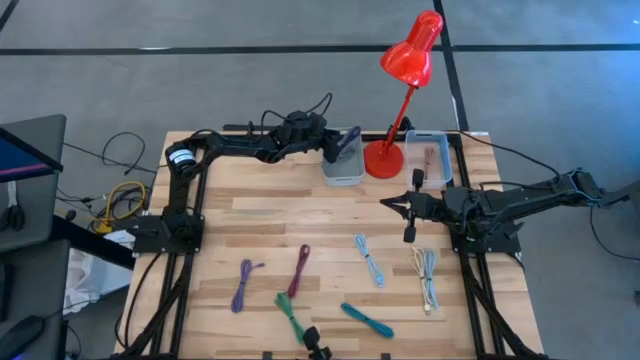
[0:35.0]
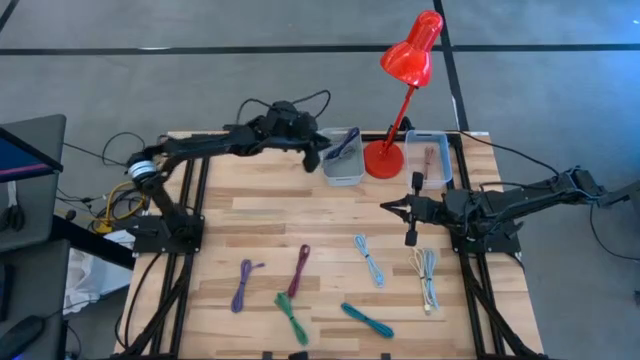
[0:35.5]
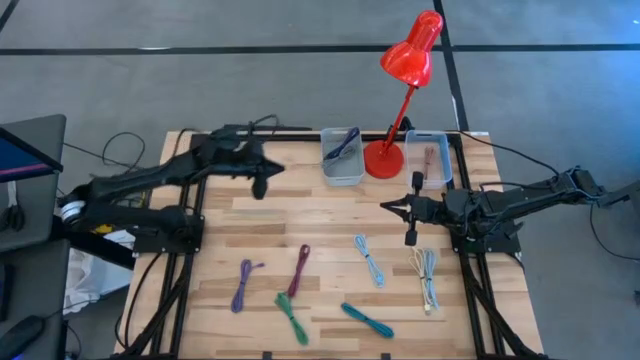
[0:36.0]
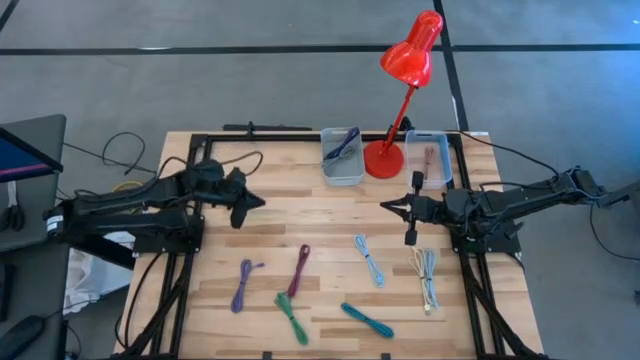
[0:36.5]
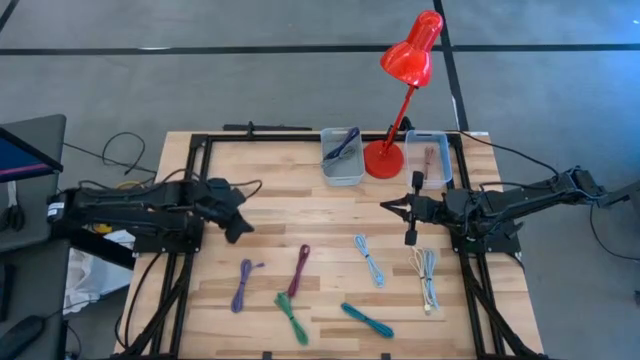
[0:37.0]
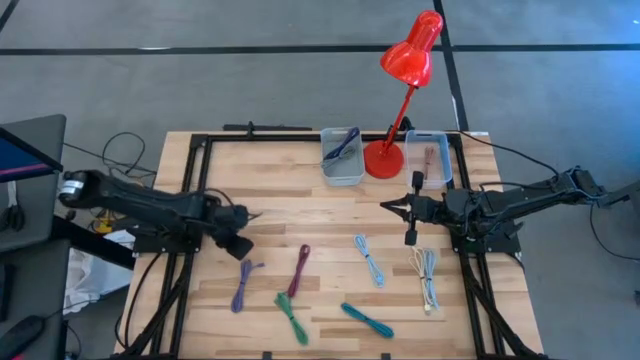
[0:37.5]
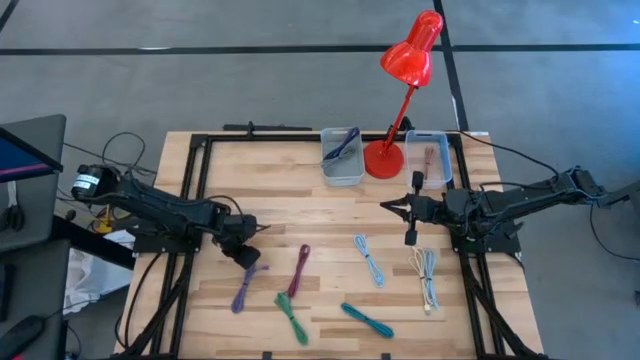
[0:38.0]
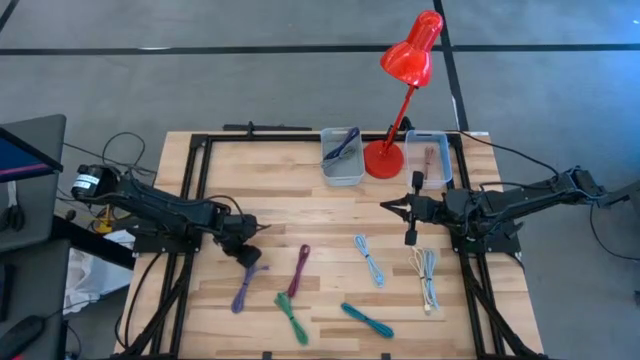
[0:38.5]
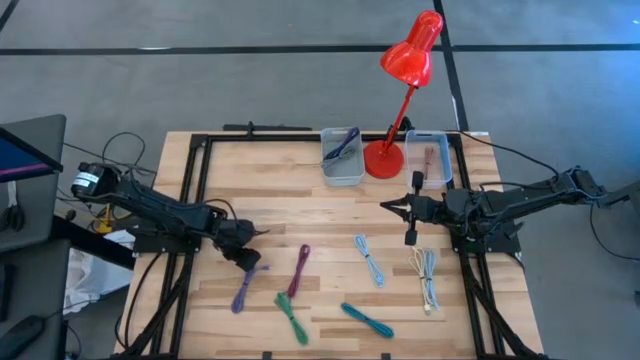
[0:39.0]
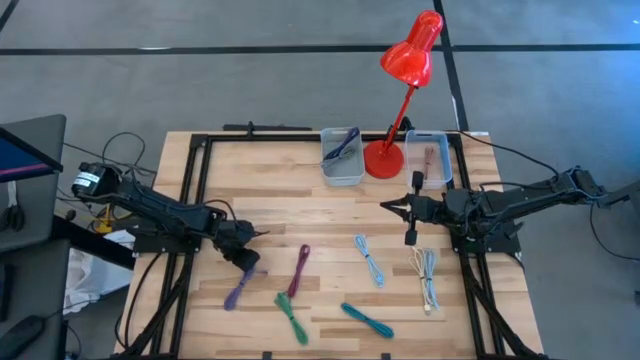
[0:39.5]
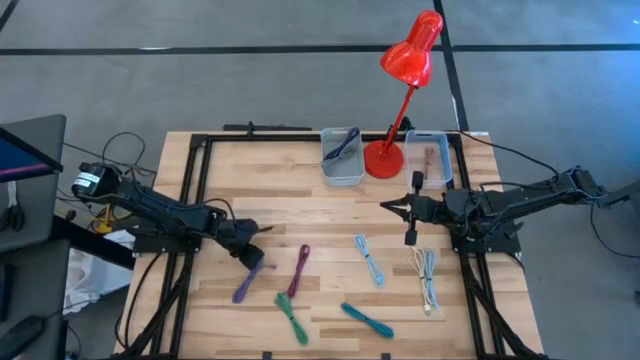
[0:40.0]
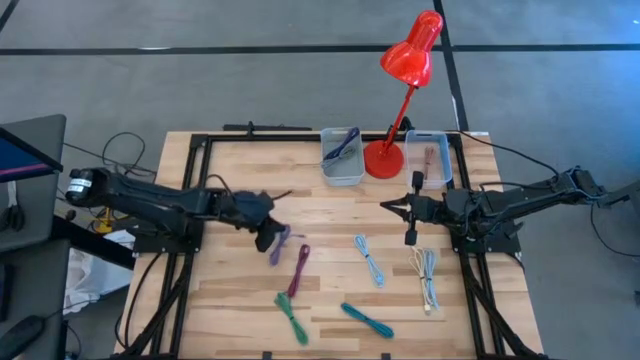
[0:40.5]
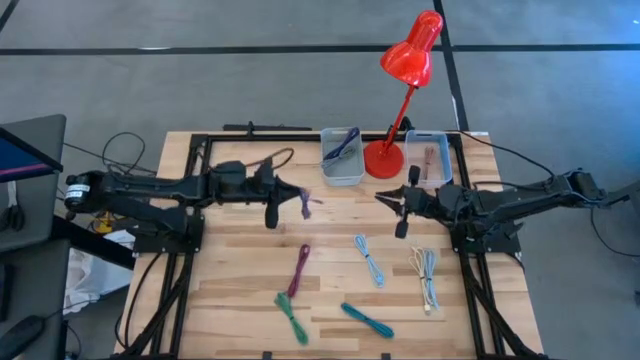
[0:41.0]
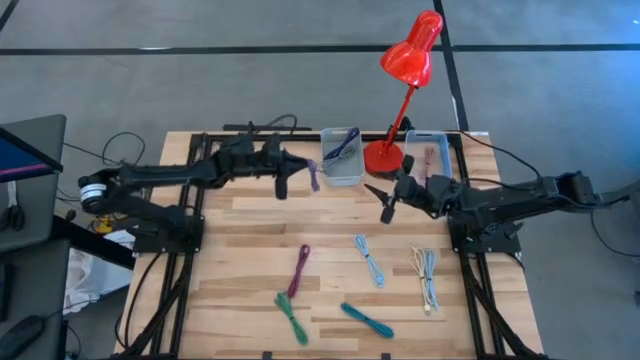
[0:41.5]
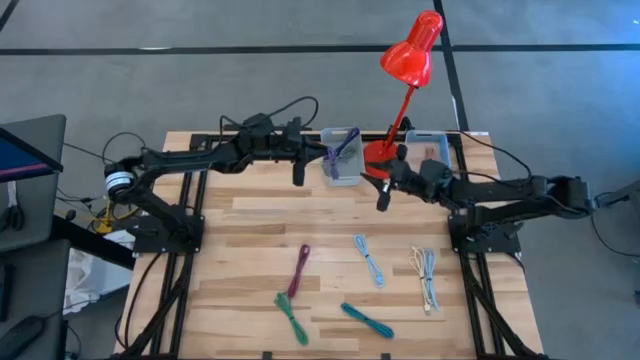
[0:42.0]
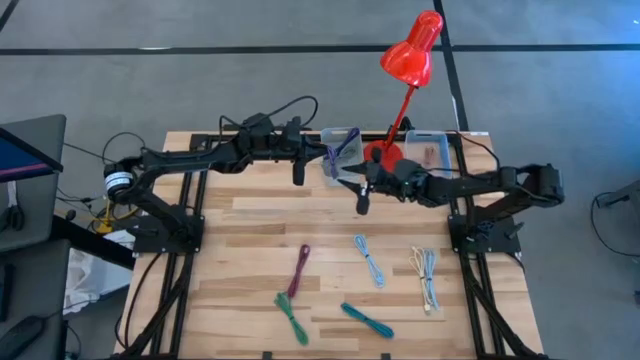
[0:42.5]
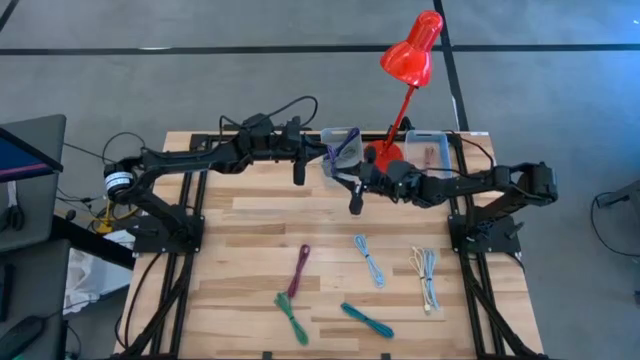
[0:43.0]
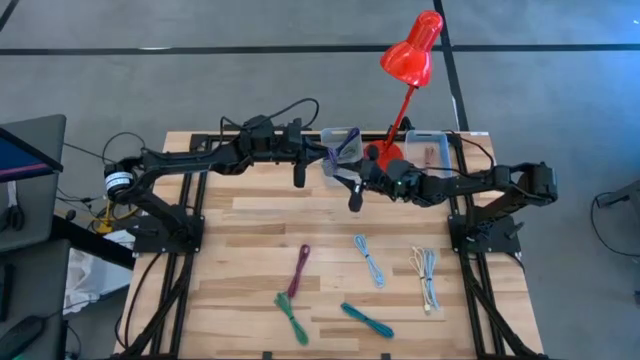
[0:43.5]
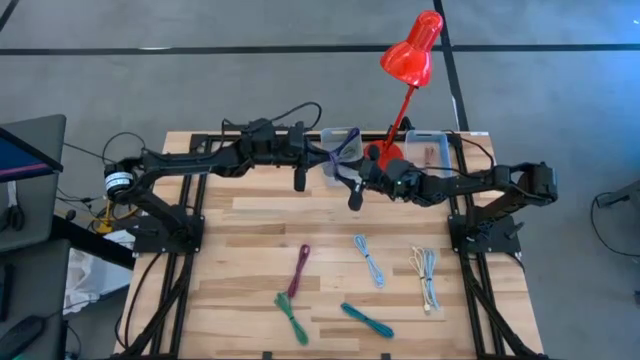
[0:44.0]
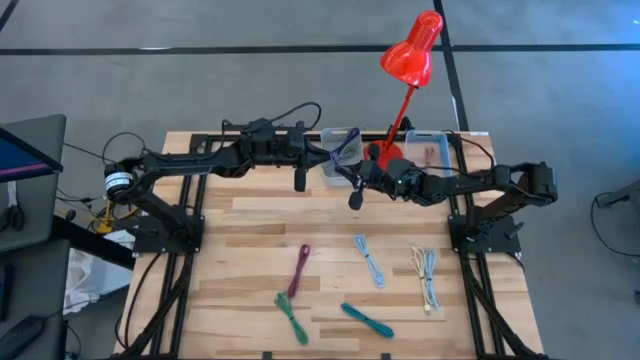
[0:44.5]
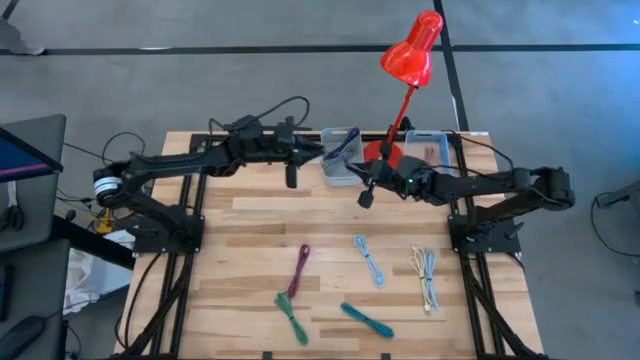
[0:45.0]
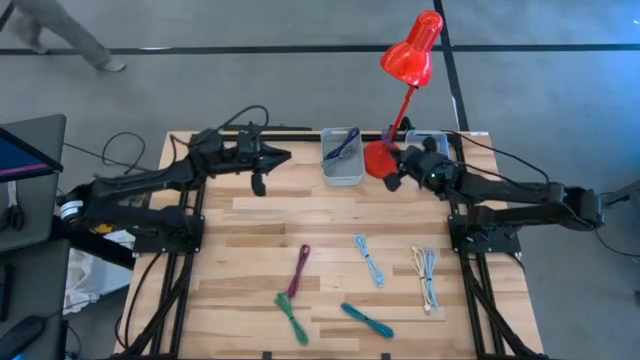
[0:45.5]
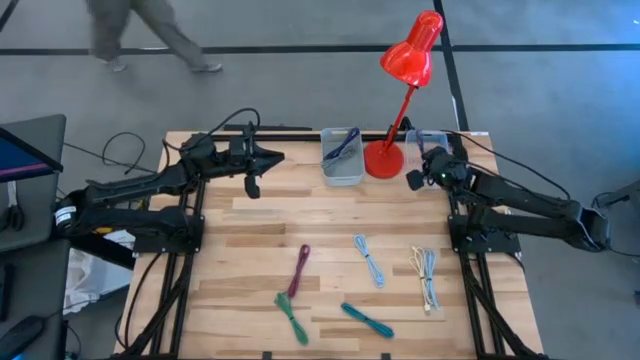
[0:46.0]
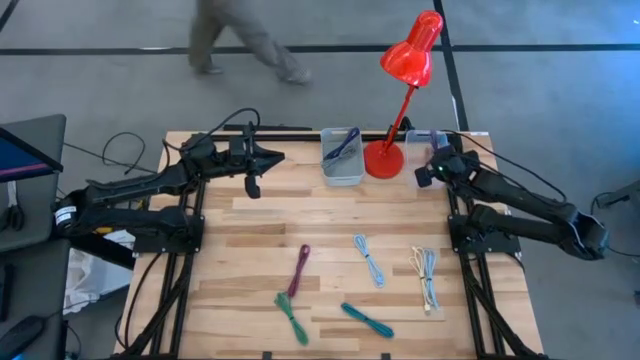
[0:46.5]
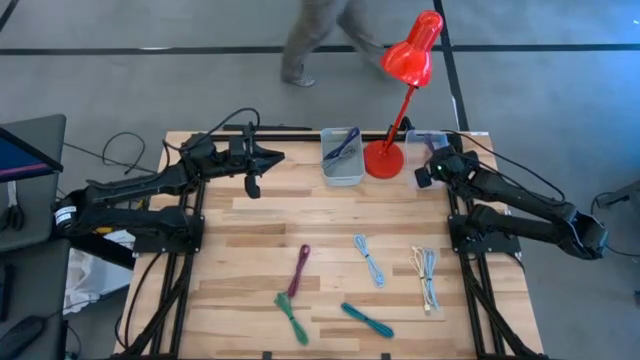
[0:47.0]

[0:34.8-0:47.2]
Task: Pick & Place USB Port
Put the purple charger cable into the transparent bin

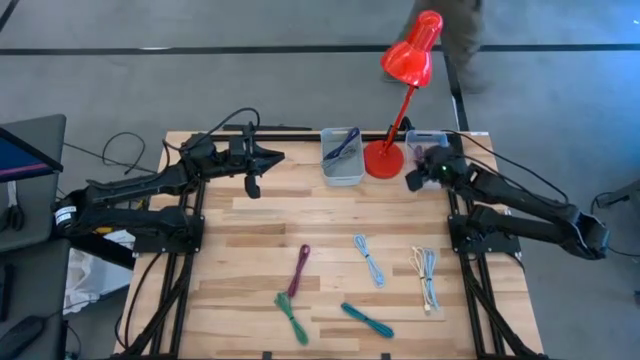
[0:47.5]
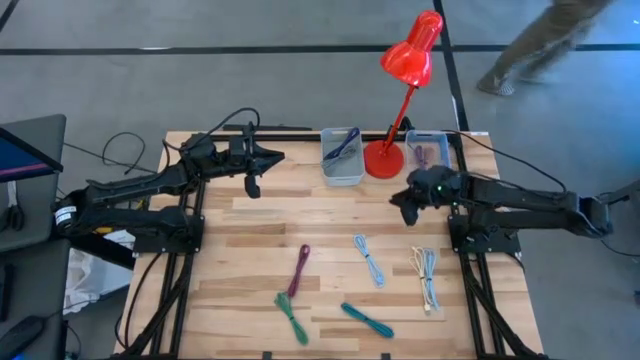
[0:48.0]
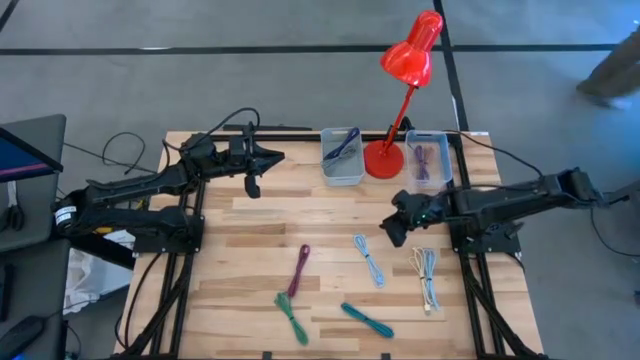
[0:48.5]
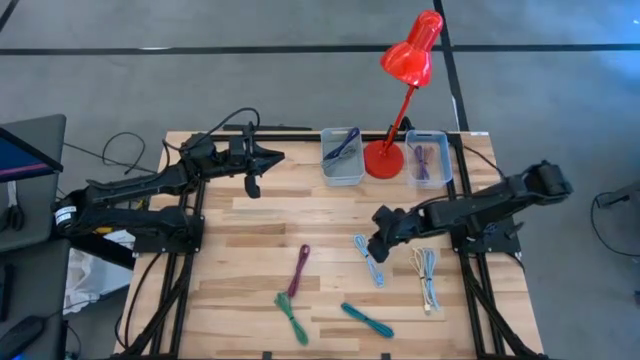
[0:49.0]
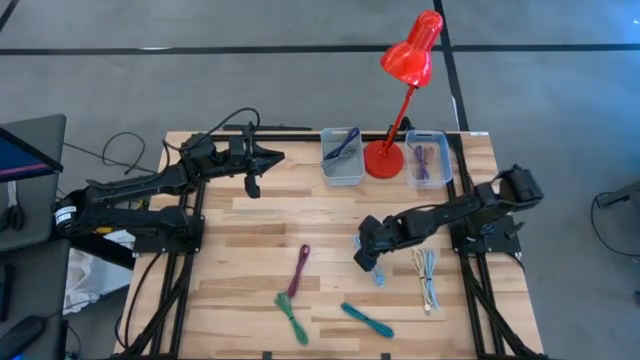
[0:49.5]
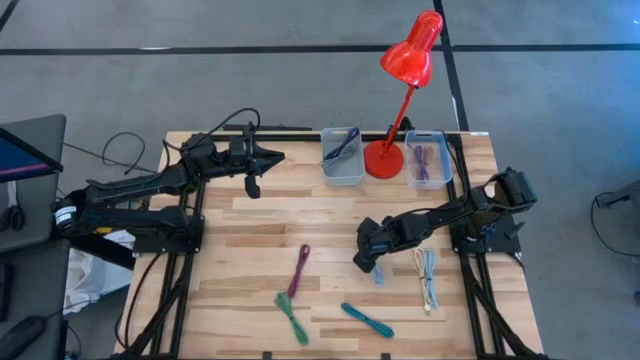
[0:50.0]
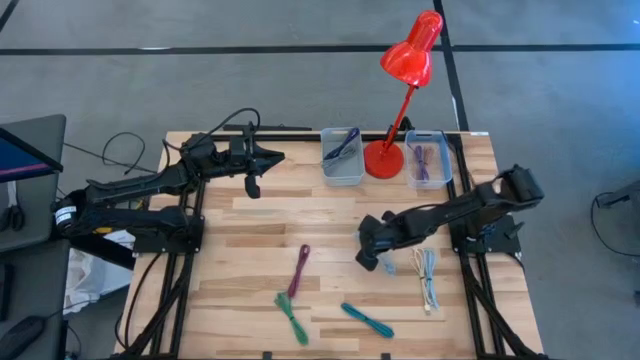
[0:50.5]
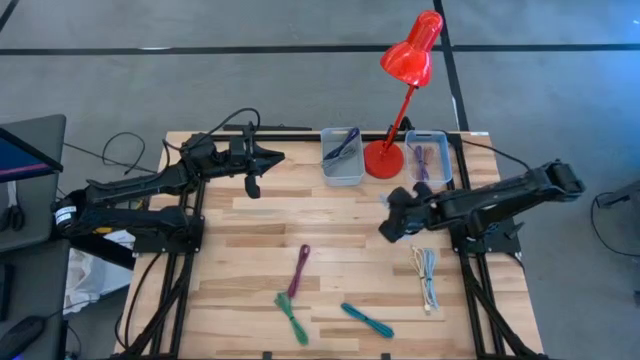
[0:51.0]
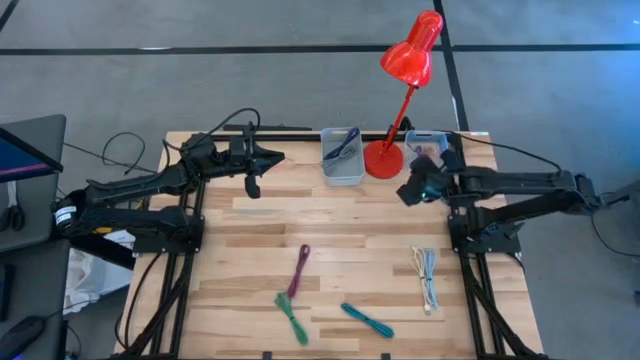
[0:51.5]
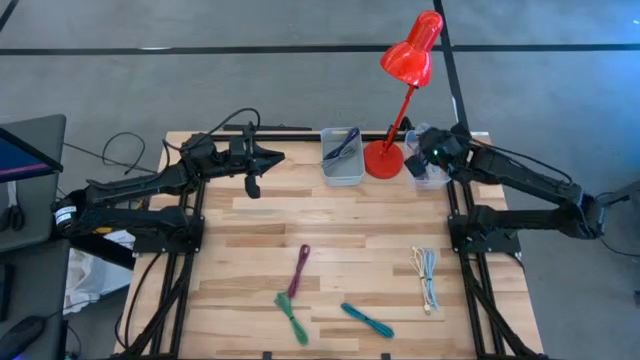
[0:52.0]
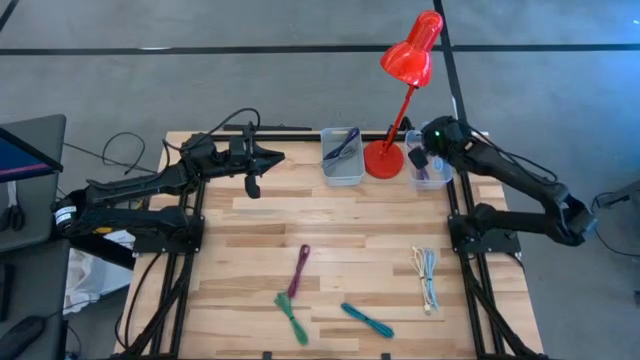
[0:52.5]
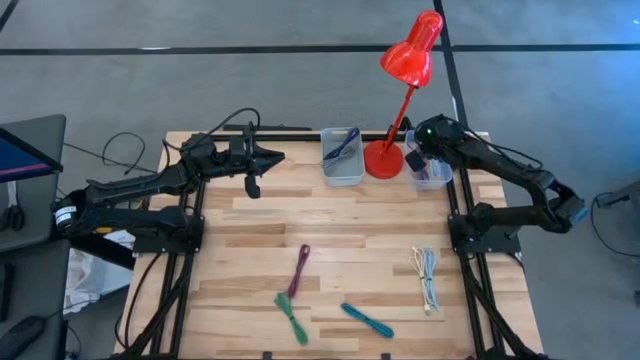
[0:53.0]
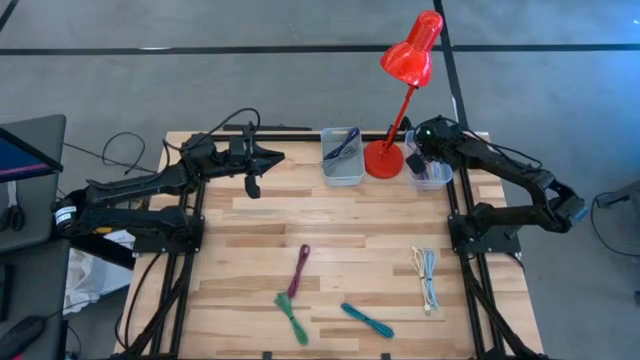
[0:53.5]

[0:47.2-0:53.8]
Put the left light blue charger cable into the transparent bin

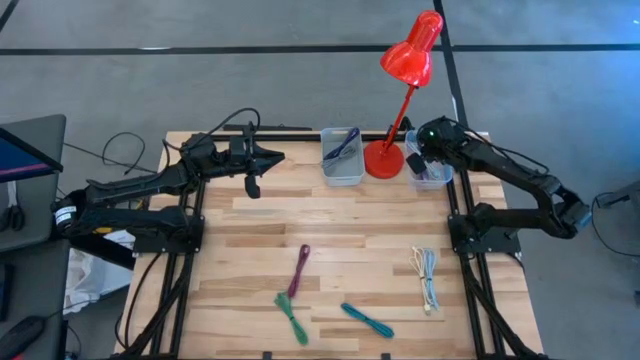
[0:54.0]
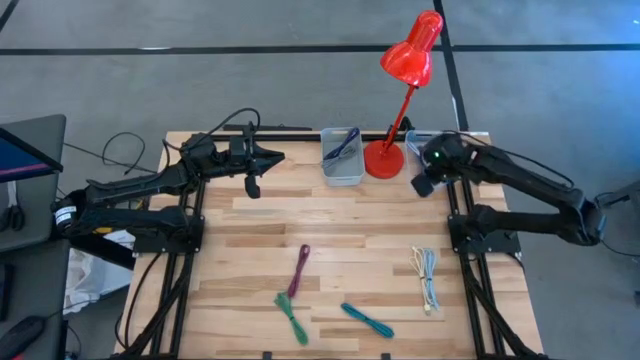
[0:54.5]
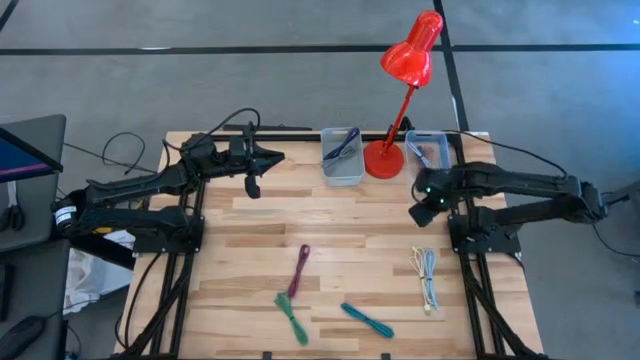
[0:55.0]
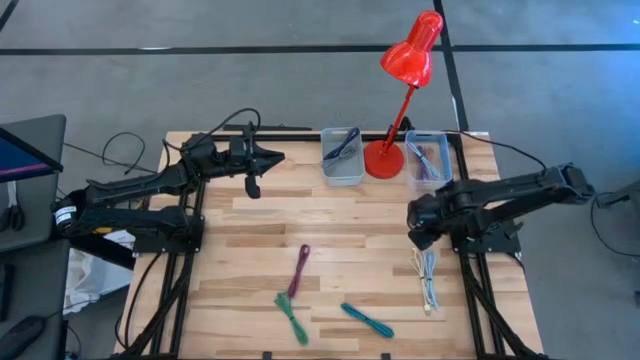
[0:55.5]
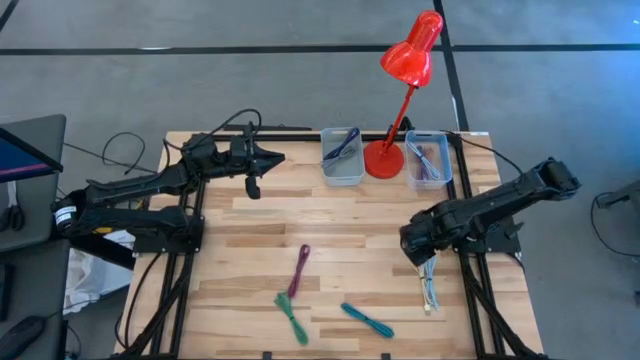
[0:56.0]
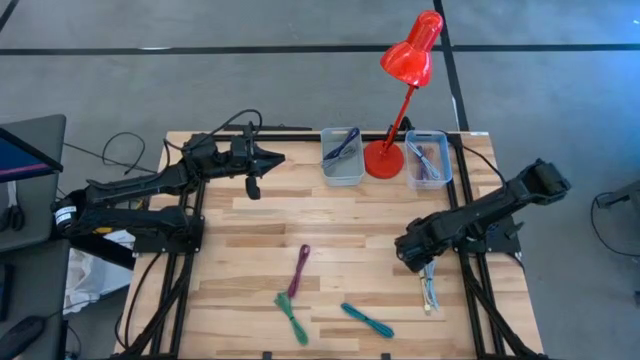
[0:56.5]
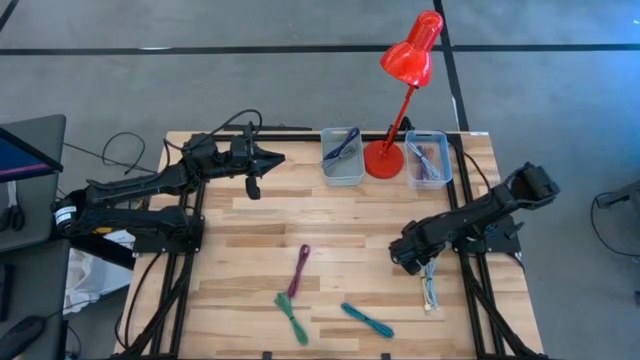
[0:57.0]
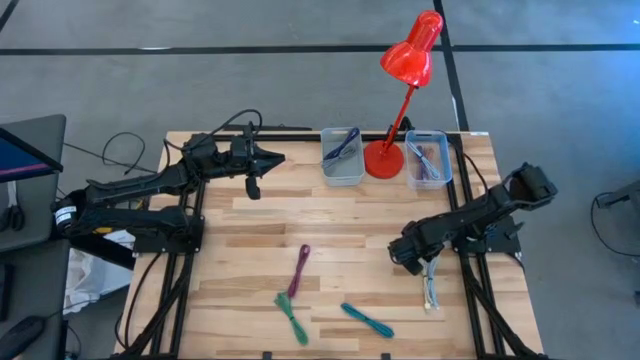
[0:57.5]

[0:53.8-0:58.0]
Put the light blue charger cable into the transparent bin
